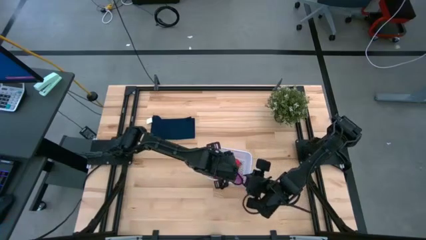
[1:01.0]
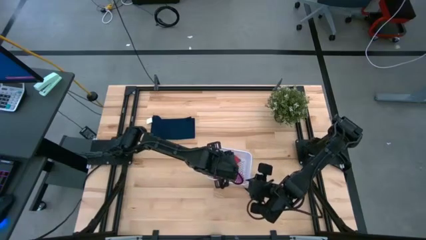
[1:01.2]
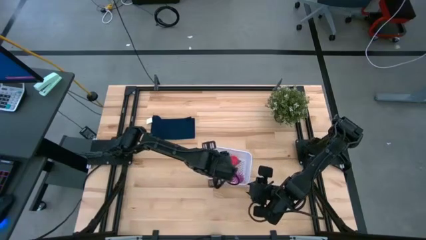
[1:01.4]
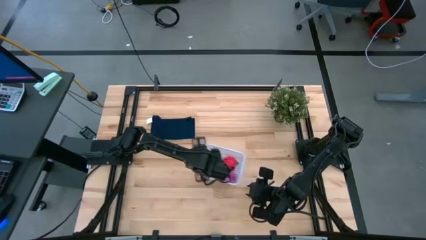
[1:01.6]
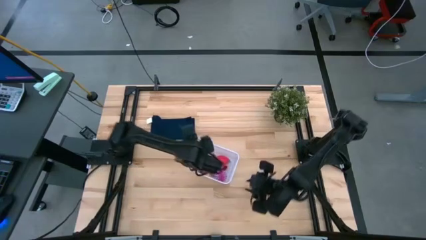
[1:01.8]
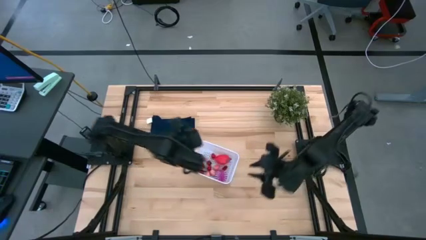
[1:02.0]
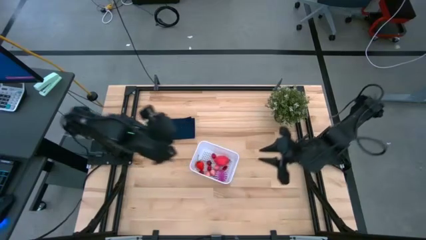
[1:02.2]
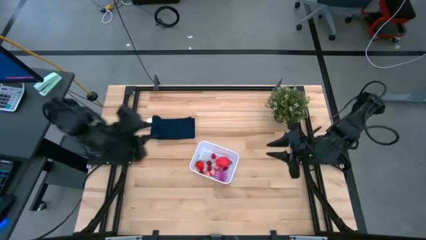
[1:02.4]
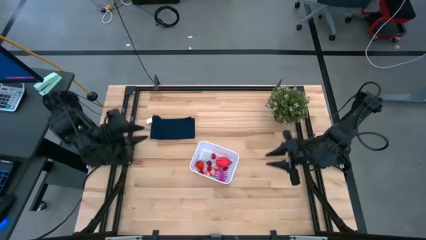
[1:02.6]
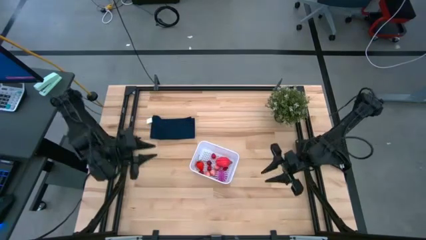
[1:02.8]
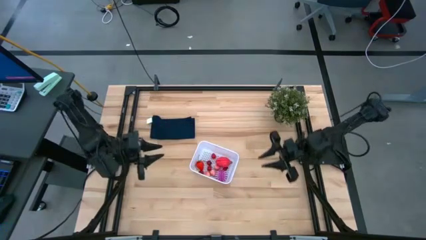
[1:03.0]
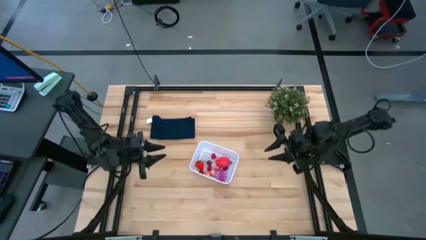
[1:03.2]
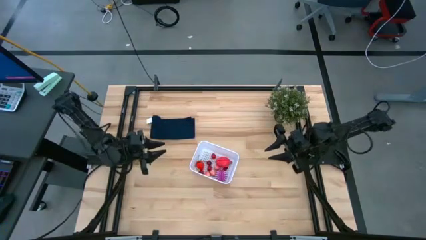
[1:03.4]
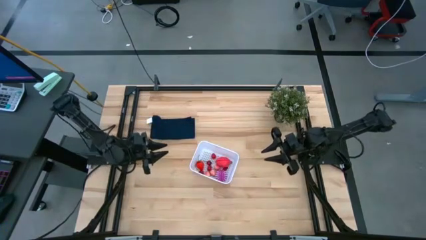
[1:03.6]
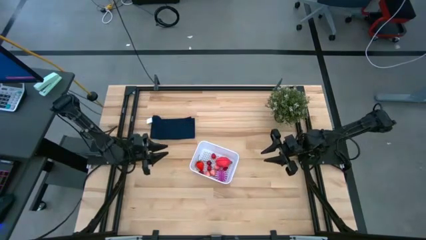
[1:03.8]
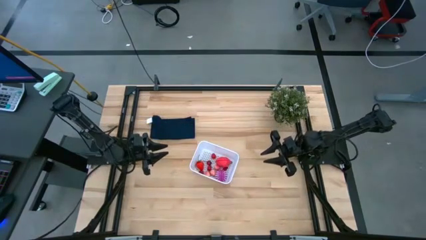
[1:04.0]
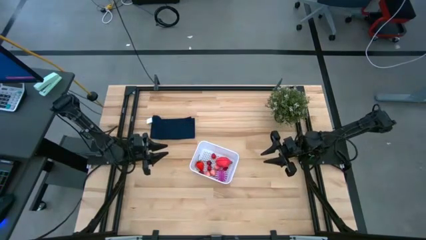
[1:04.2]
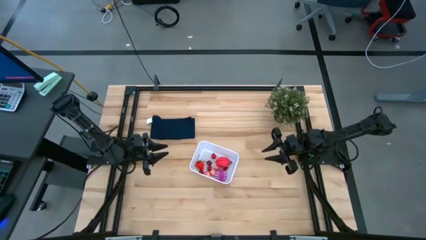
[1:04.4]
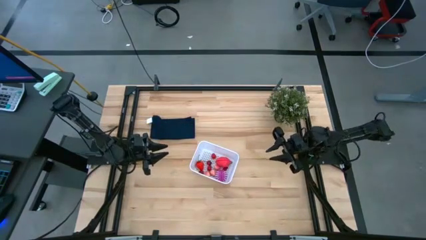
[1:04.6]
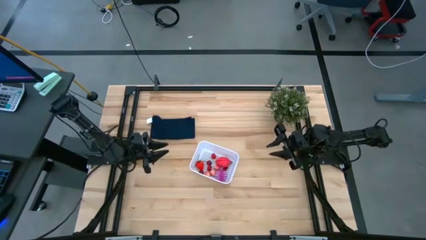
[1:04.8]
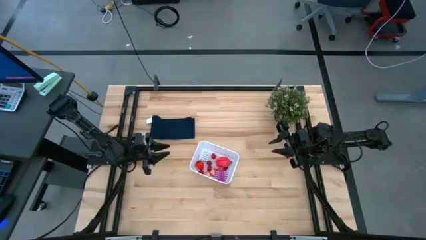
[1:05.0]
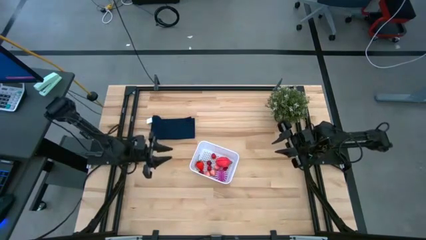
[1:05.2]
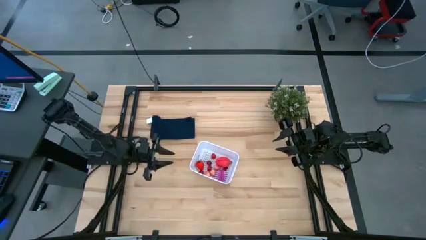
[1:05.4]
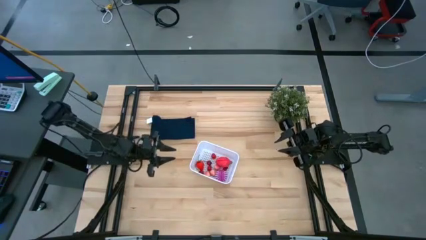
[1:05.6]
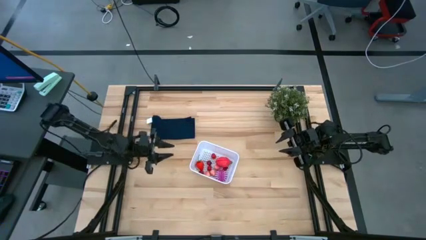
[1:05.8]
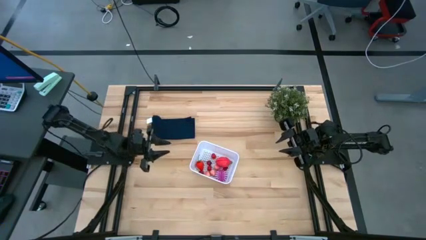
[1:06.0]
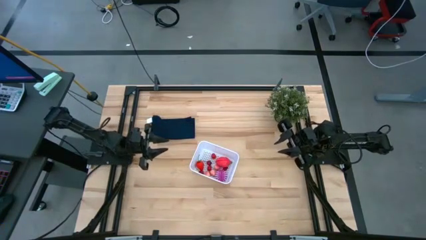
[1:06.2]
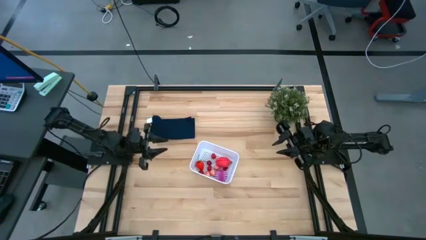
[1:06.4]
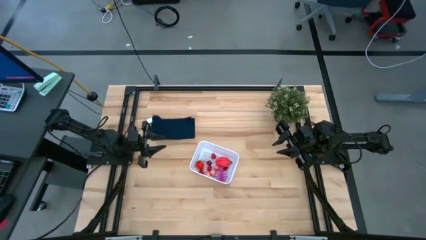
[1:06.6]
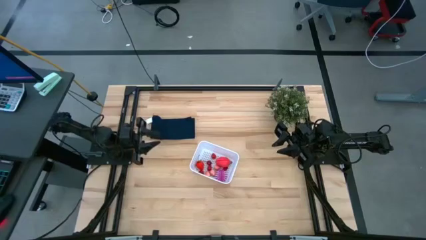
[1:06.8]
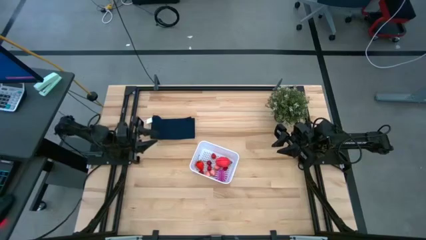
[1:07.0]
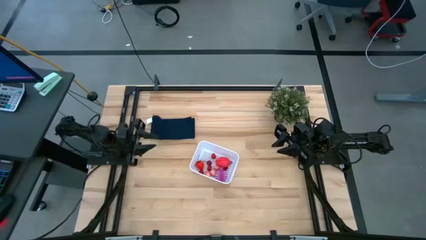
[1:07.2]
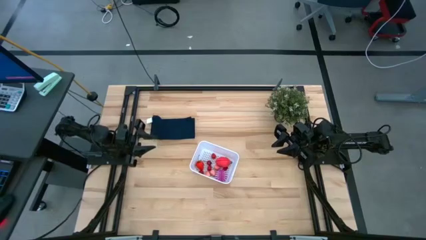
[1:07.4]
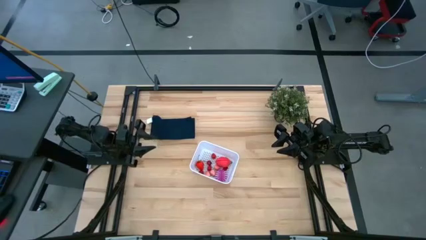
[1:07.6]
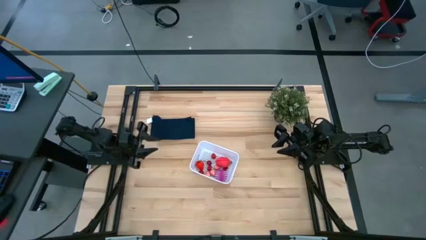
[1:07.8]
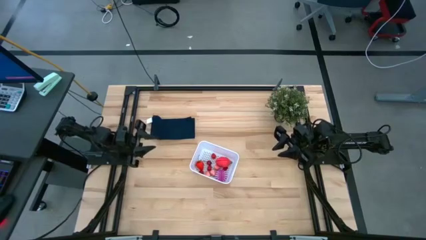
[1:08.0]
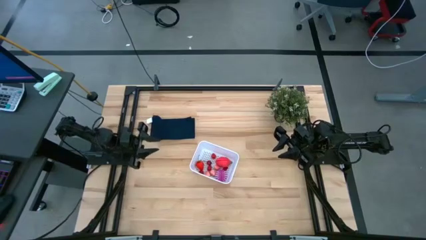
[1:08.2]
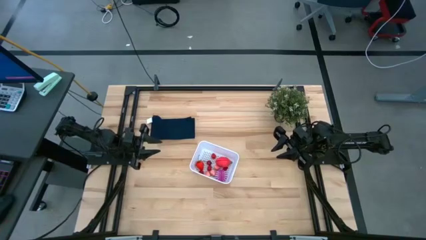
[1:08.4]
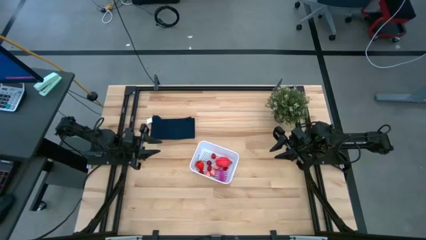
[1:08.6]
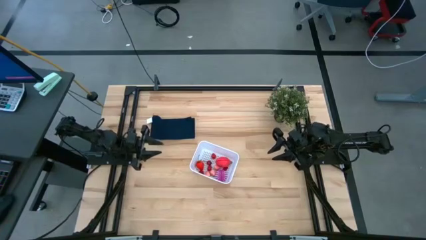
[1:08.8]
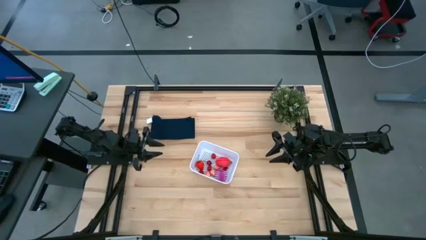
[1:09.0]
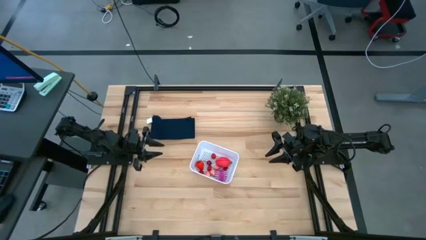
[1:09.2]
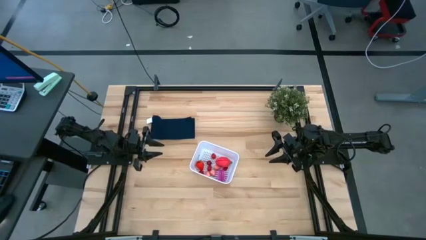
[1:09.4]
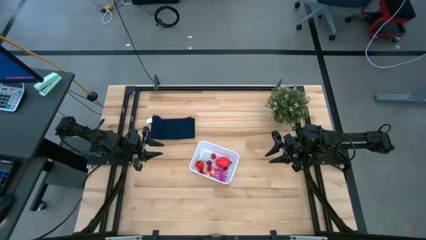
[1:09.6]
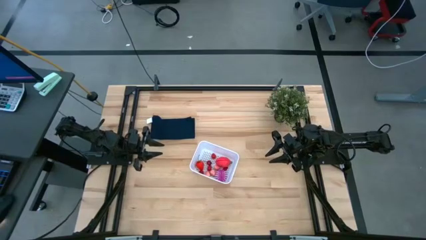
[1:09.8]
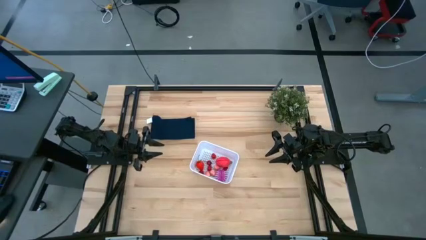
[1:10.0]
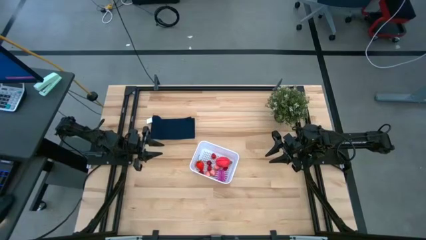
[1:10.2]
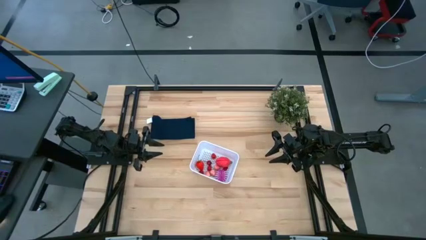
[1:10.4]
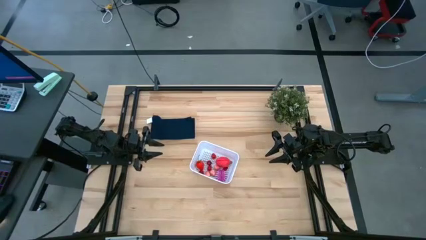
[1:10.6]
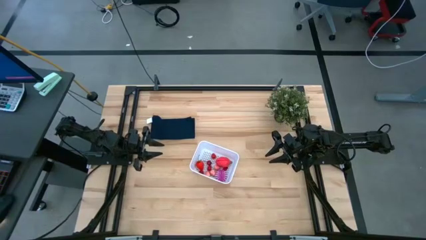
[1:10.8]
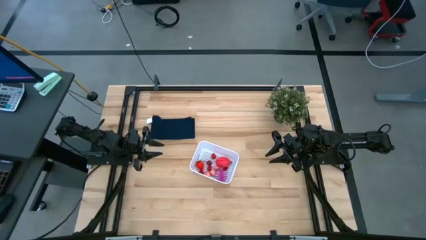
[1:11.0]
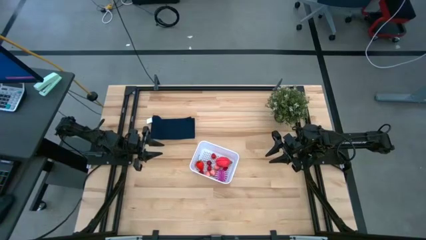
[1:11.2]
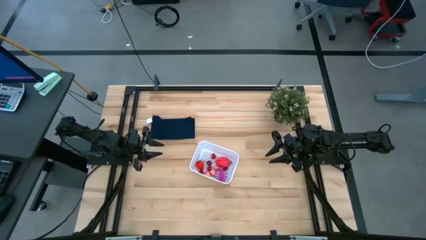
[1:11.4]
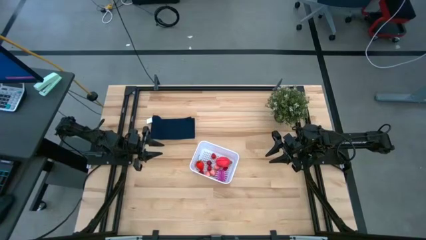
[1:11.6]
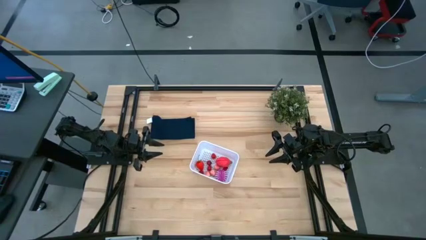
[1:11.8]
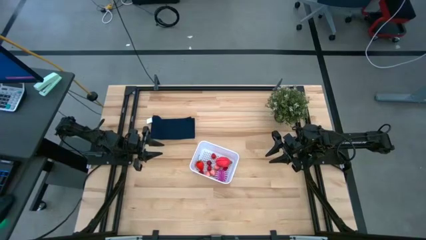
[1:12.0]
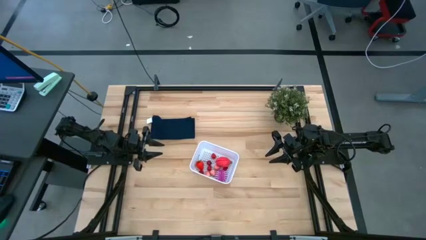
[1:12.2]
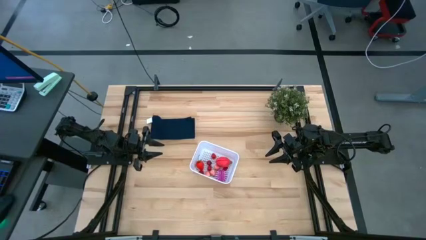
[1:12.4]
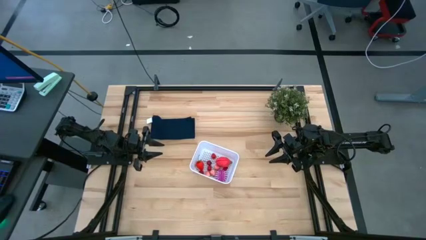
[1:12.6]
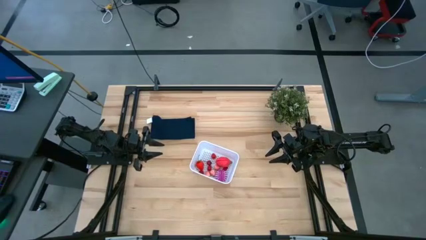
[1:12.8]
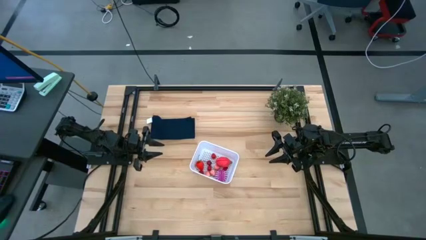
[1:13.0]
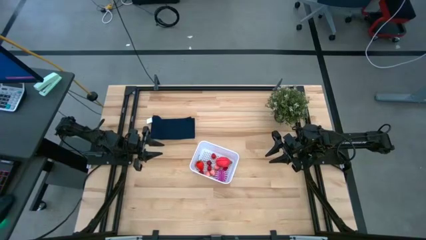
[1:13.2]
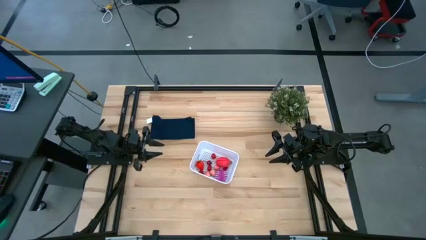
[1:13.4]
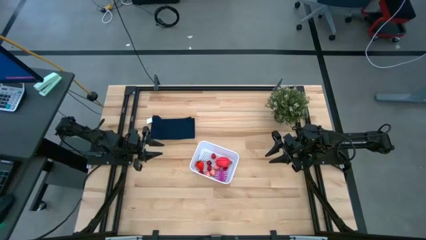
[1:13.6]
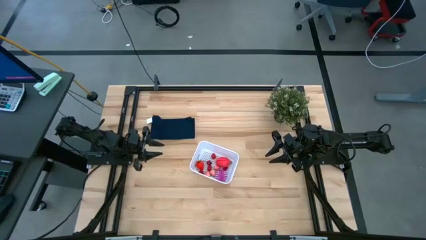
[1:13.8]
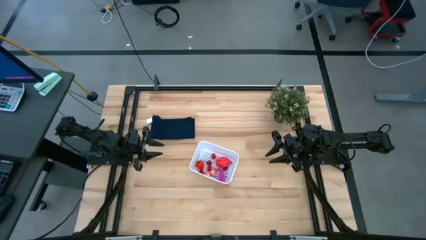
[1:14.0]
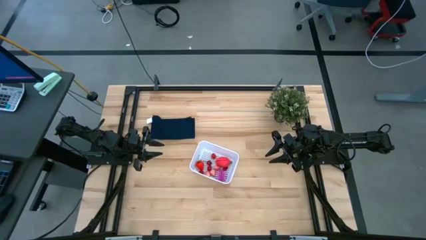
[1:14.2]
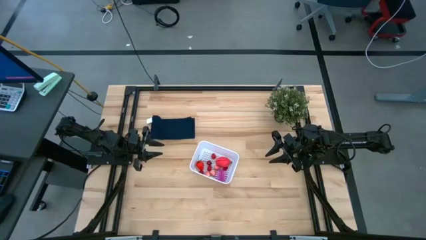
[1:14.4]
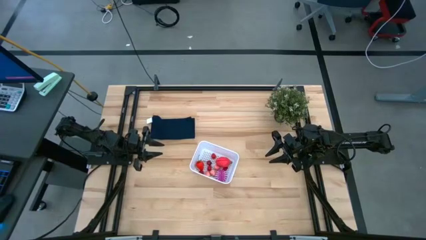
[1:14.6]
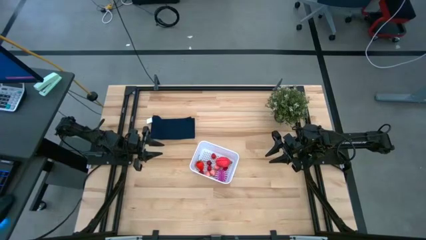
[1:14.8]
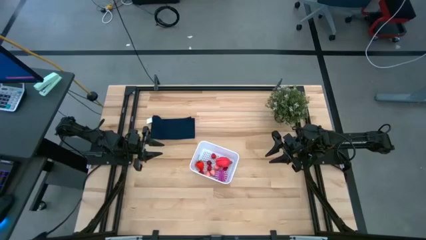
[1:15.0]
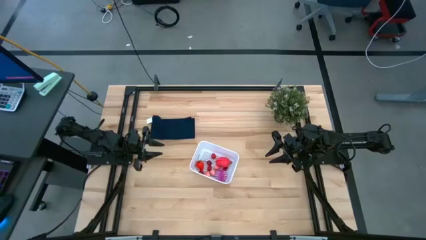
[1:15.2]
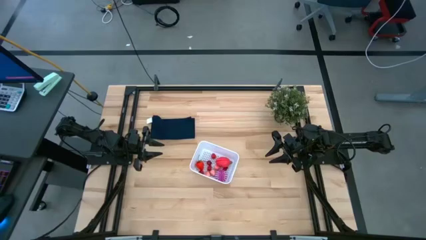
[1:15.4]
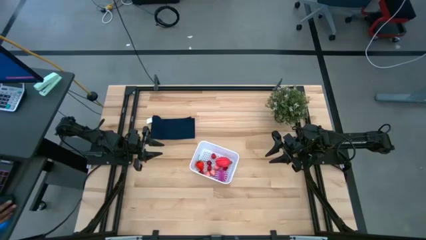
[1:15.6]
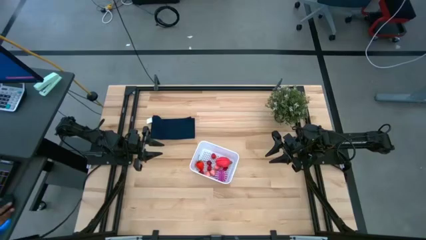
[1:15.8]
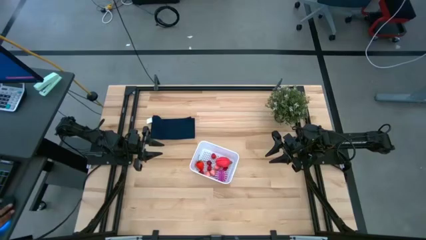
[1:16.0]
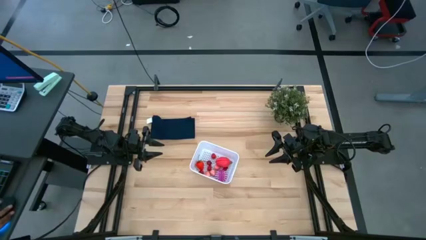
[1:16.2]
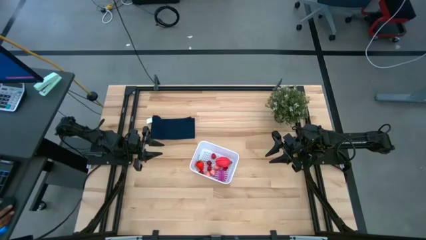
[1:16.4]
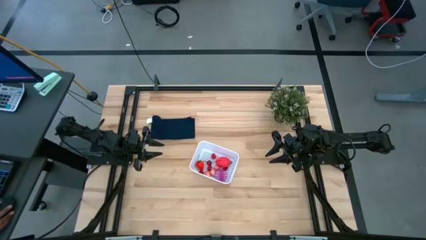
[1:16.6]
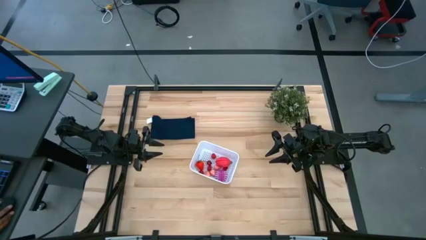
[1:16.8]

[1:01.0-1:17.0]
Task: Pick and placing Produce into tupperware
Return to Home Position
